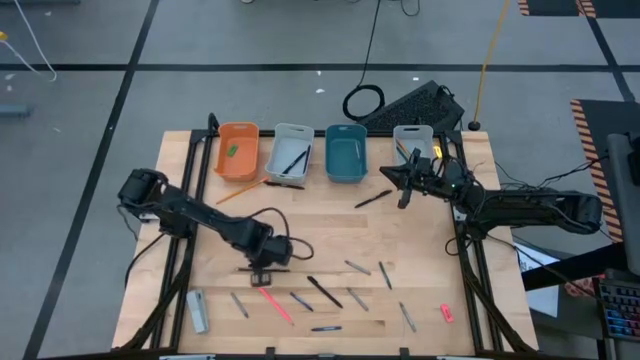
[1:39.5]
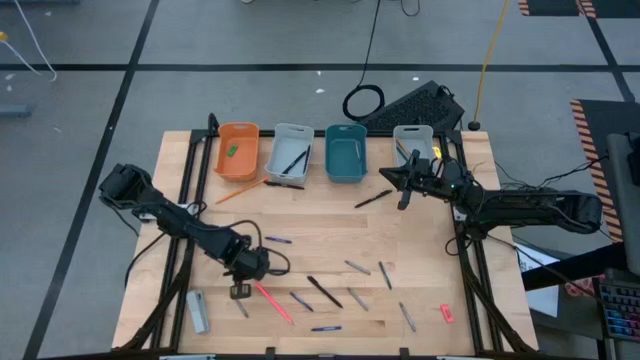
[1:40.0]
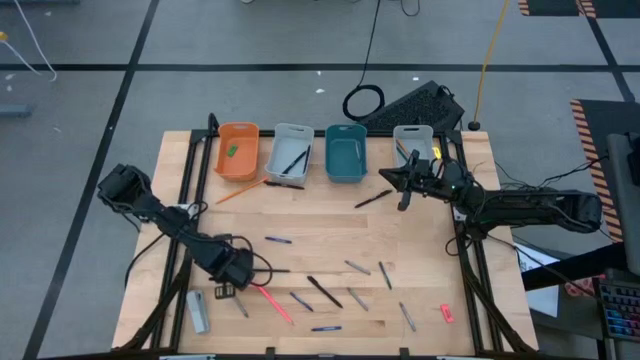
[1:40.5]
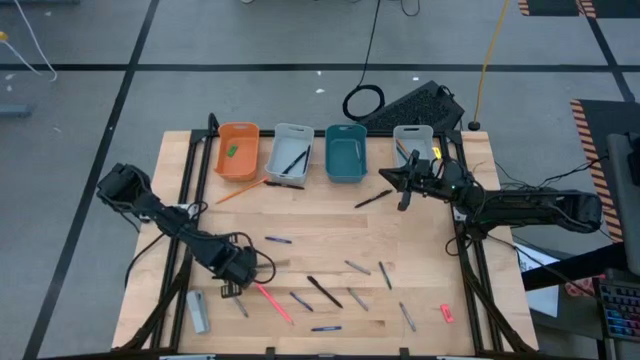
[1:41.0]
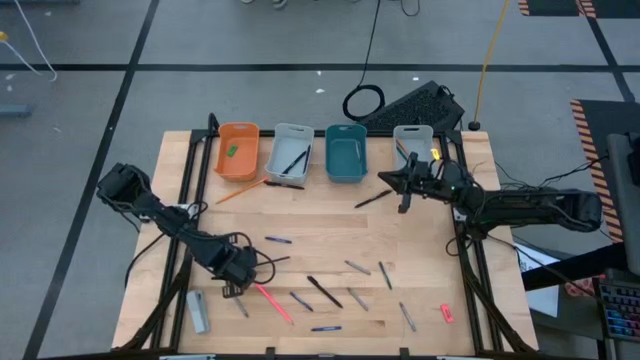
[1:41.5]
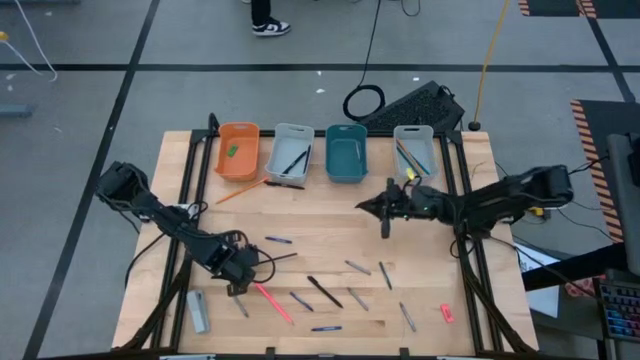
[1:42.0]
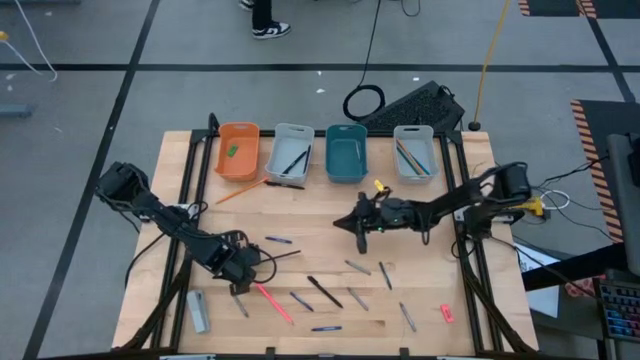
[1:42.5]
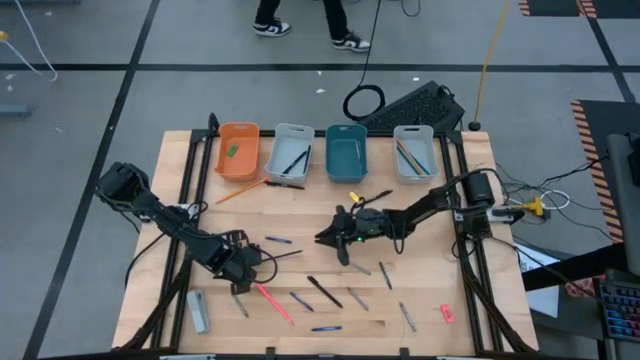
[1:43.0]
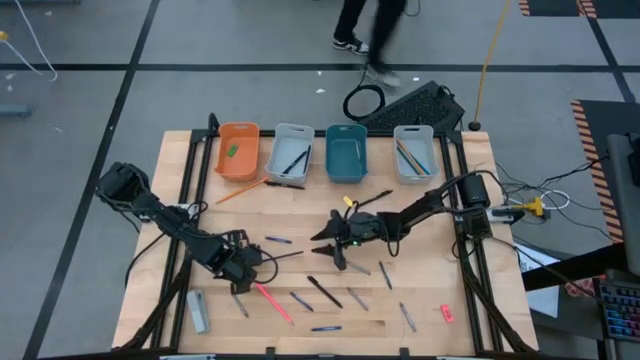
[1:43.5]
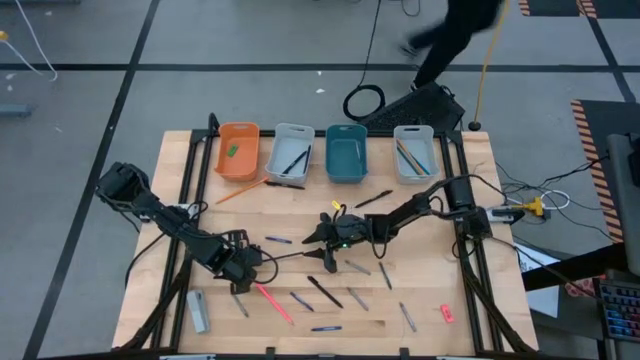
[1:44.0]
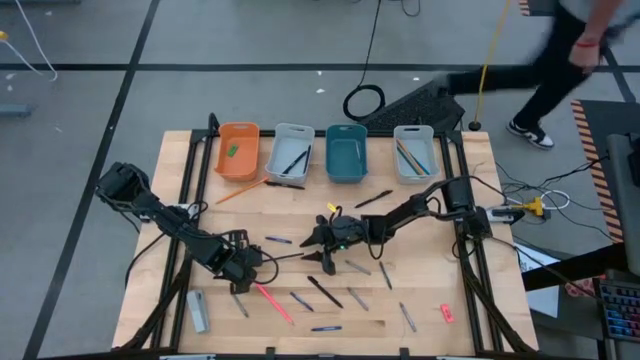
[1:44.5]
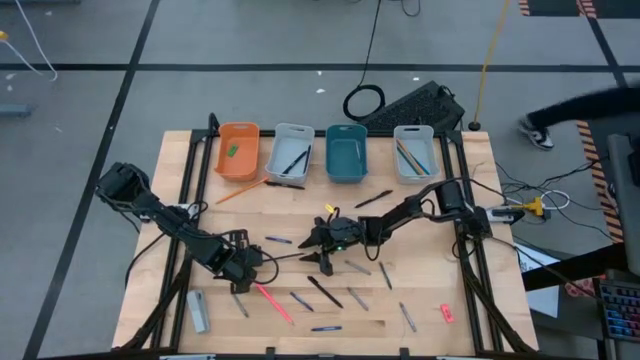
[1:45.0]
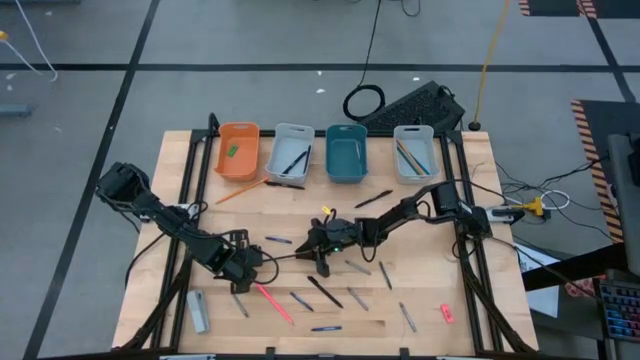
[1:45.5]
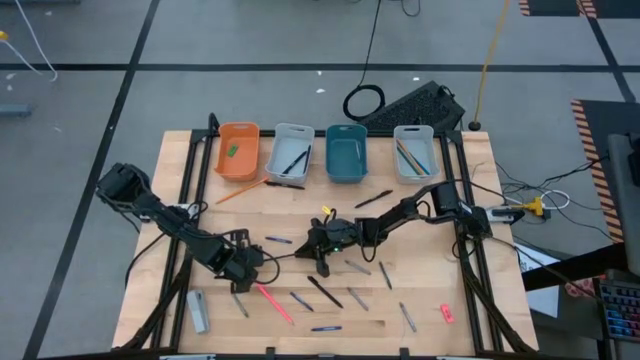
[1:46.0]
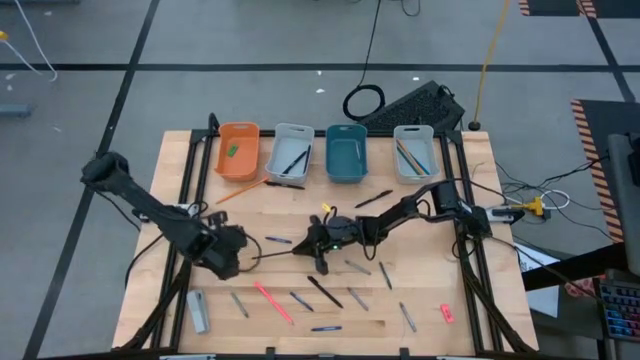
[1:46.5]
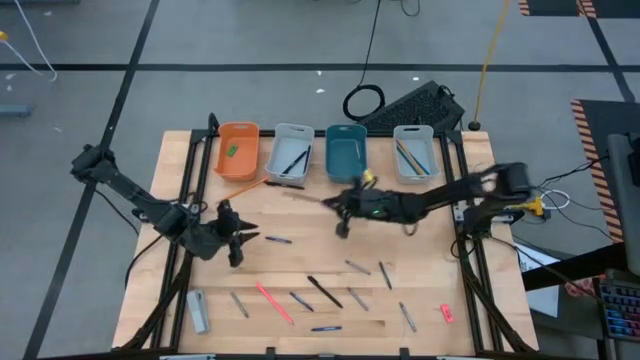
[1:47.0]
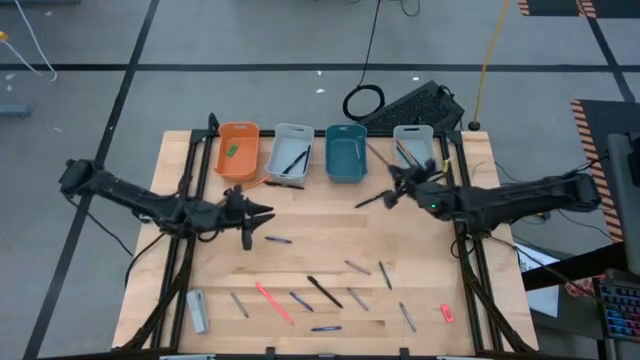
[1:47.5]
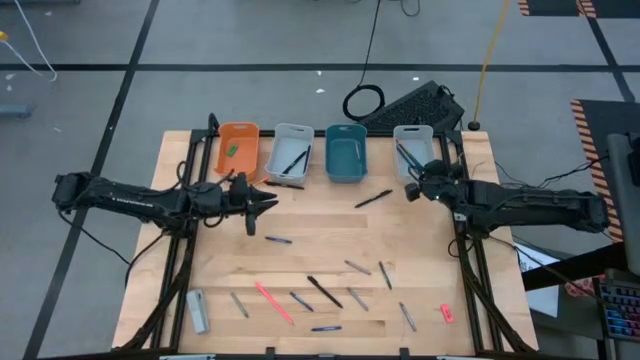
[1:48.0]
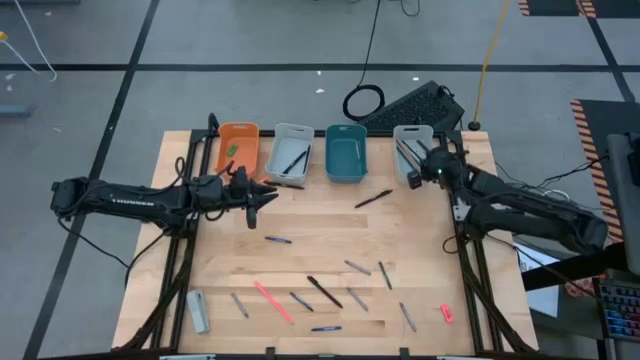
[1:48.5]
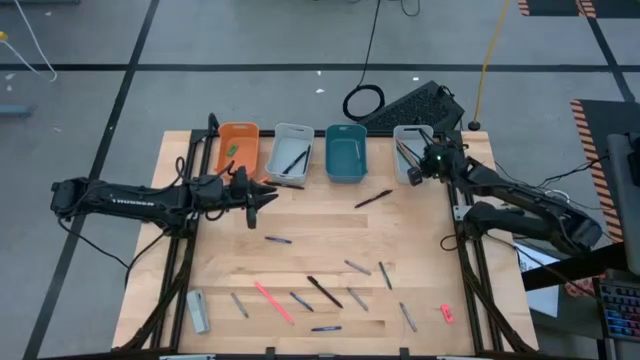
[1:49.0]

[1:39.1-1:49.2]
Task: Sort crayons/erasers/pens/pencils in bins
Put the dark blue colored pencil into the right gray bin

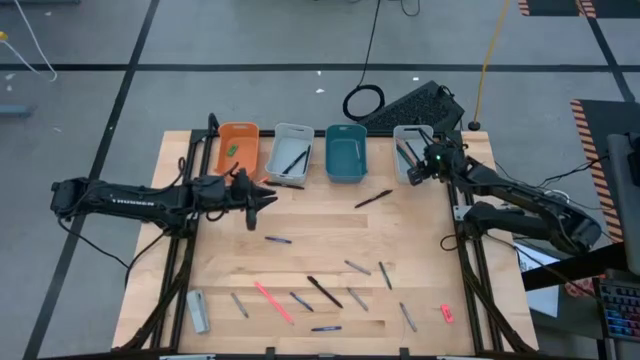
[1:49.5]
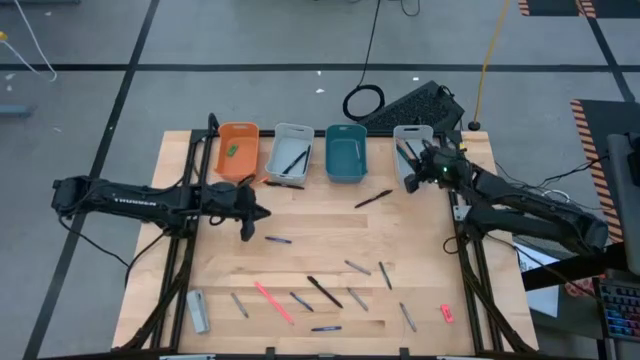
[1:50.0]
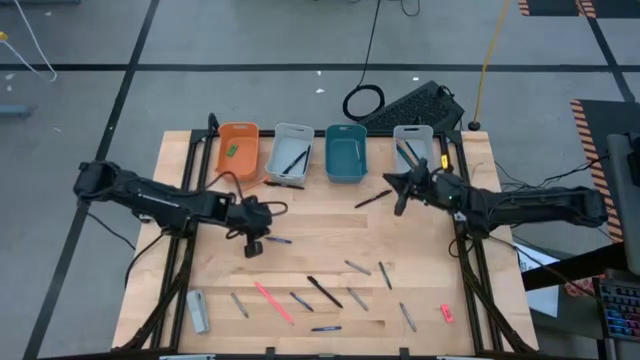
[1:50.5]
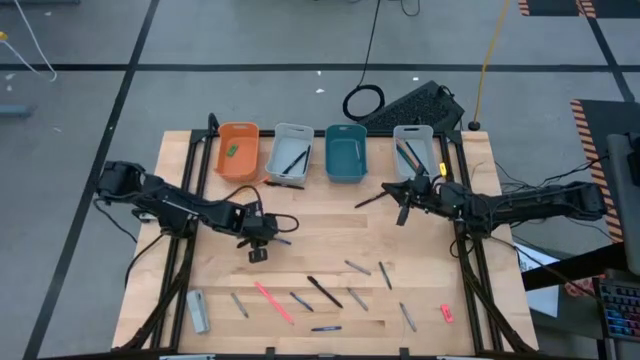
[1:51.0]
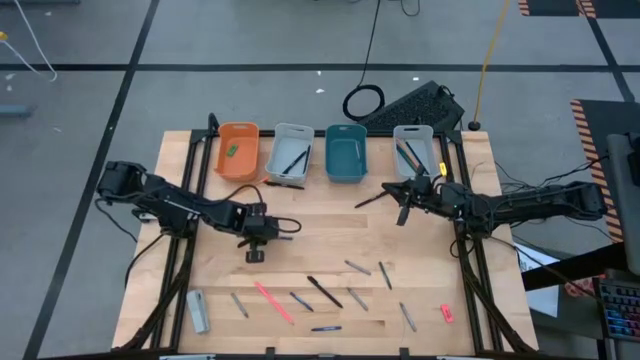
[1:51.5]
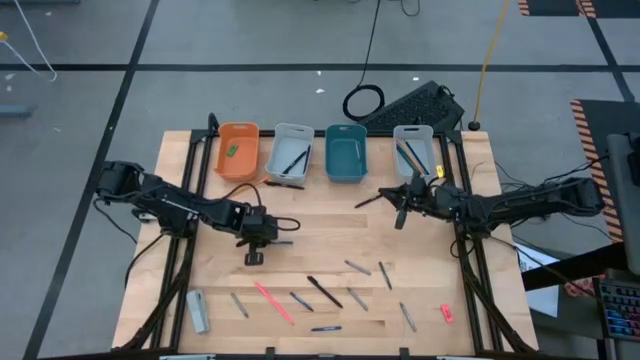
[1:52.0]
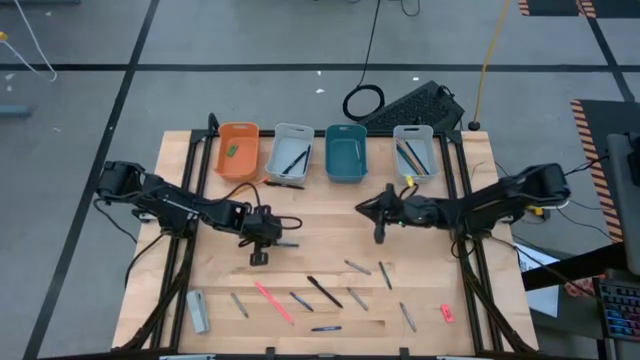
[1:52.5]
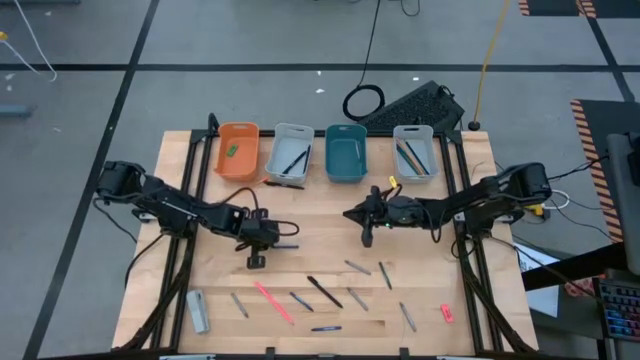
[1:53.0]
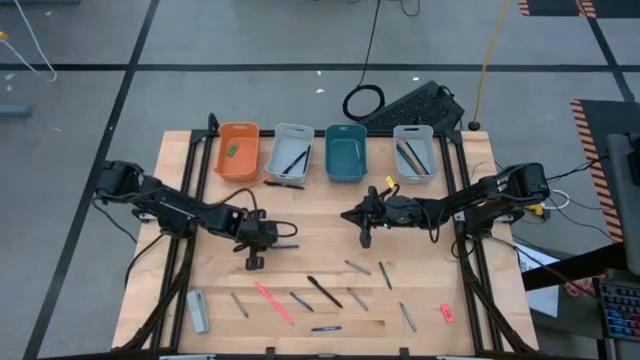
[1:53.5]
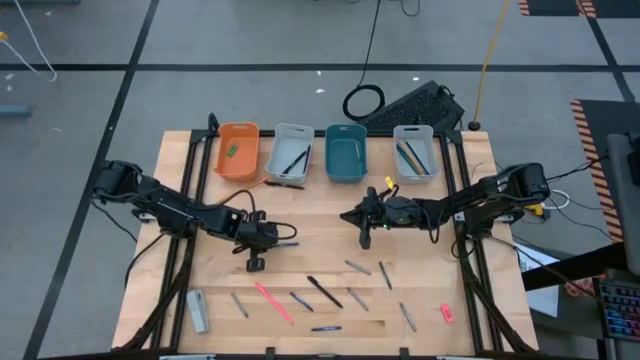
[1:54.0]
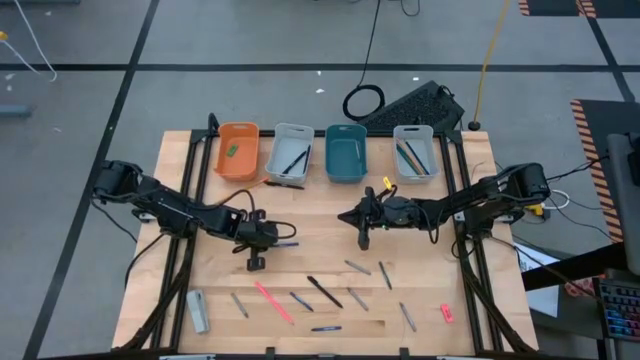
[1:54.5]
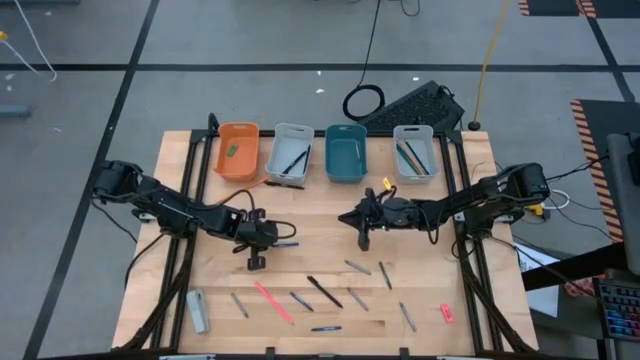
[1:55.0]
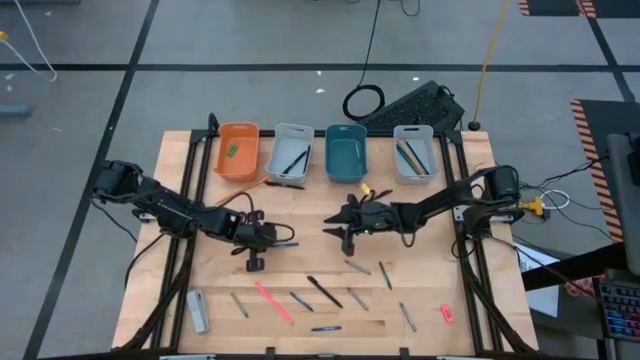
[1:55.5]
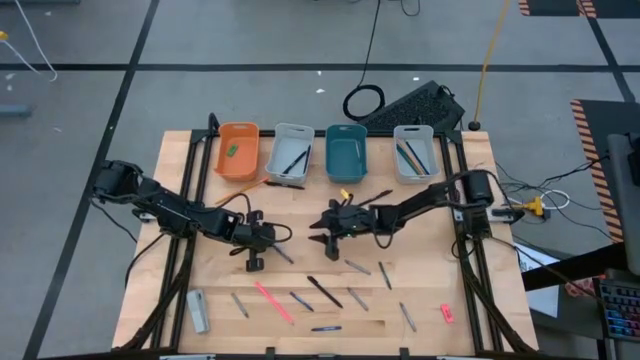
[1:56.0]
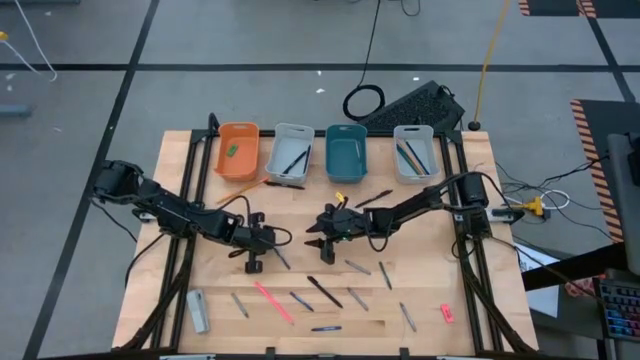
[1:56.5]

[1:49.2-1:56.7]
Put the blue crayon into the blue bin

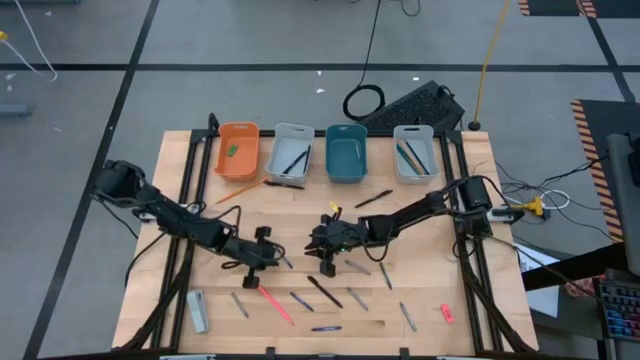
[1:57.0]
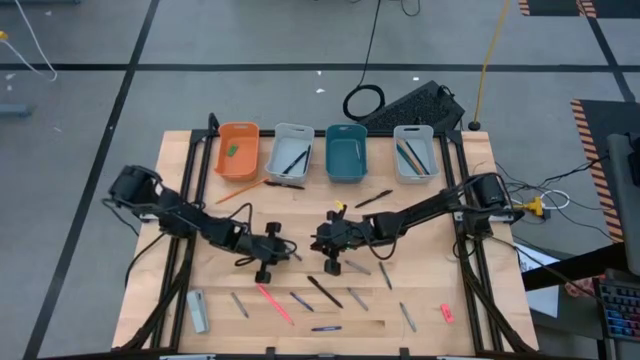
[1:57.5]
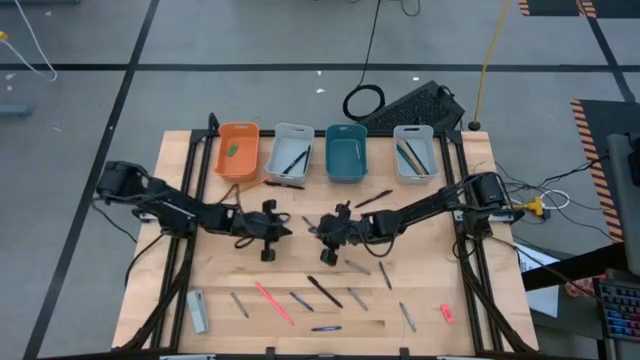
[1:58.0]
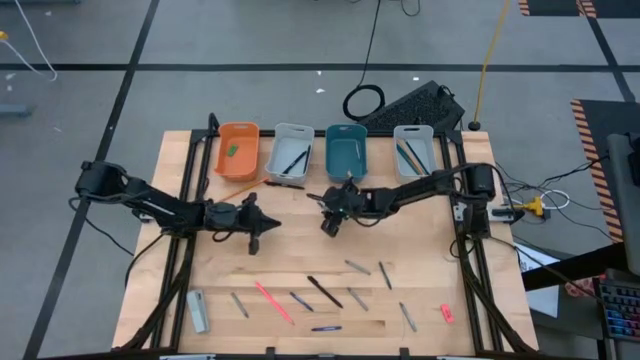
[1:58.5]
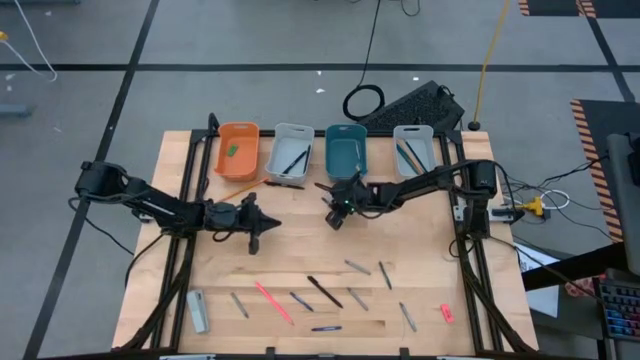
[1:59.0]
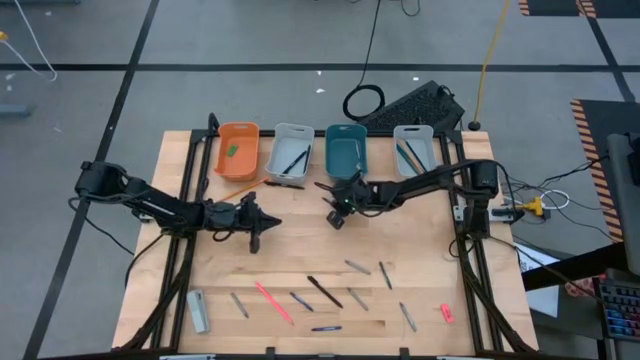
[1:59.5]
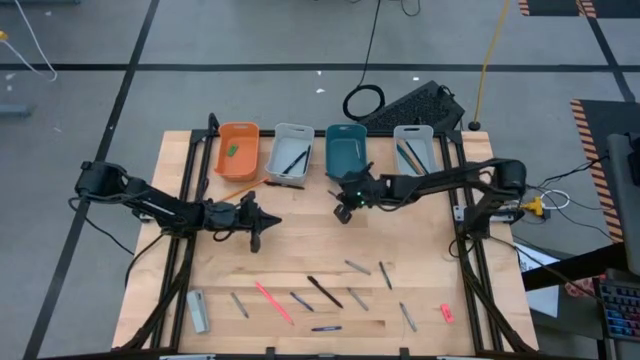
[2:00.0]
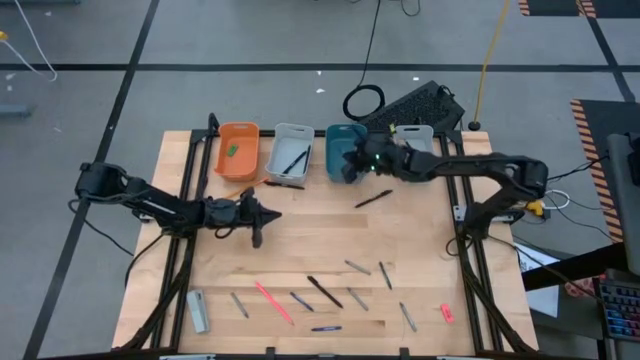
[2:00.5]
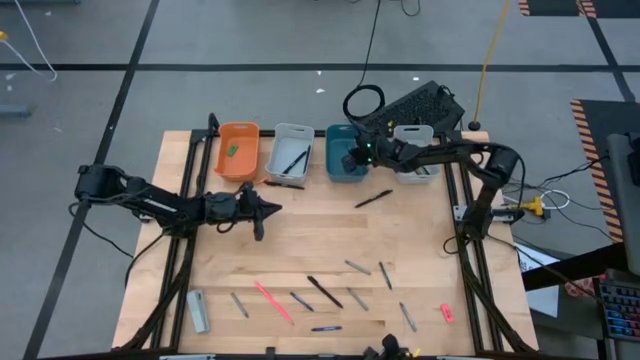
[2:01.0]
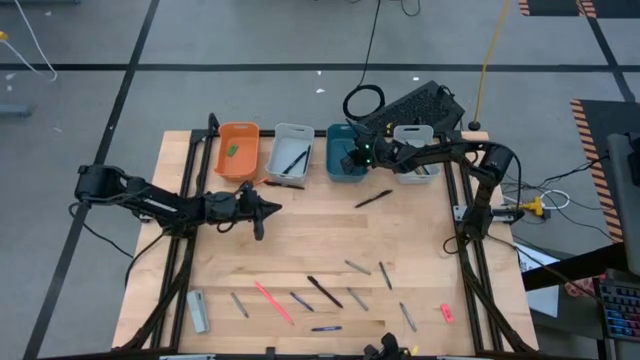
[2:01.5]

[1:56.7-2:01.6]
Put the blue crayon into the blue bin
